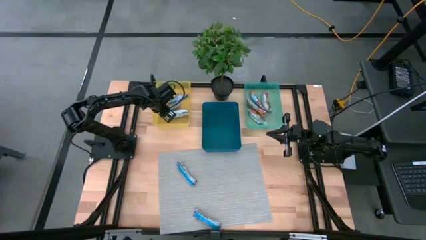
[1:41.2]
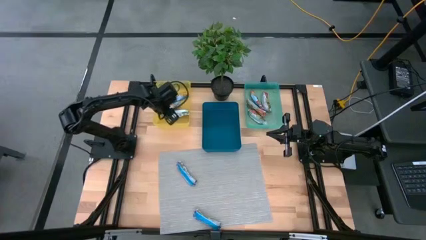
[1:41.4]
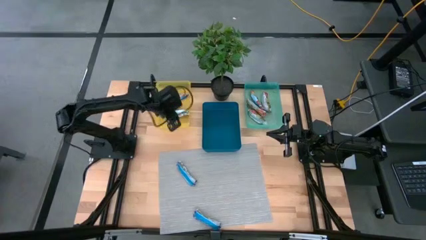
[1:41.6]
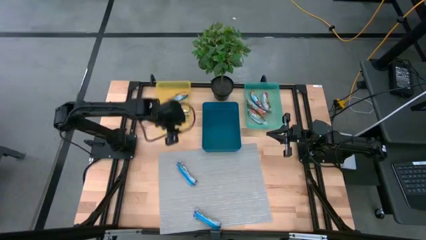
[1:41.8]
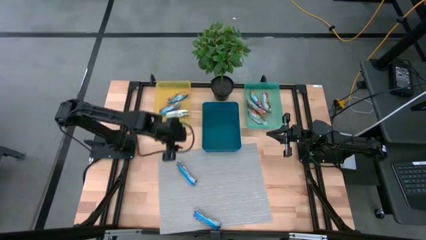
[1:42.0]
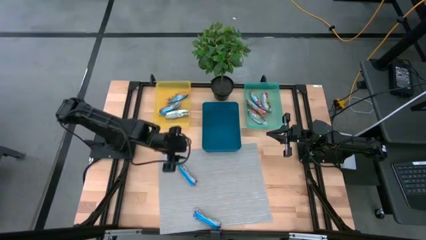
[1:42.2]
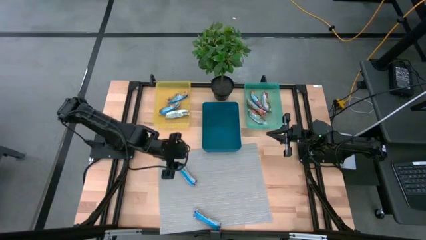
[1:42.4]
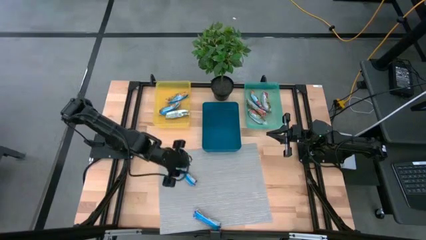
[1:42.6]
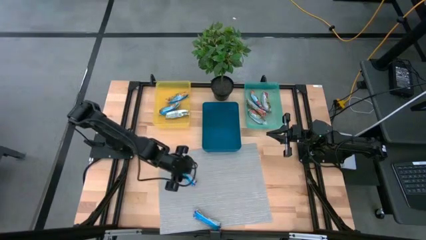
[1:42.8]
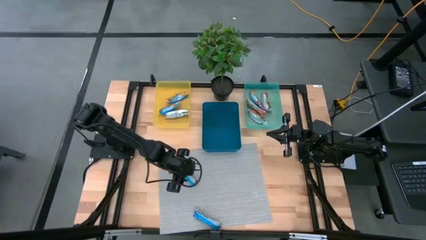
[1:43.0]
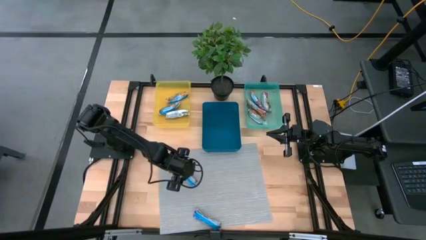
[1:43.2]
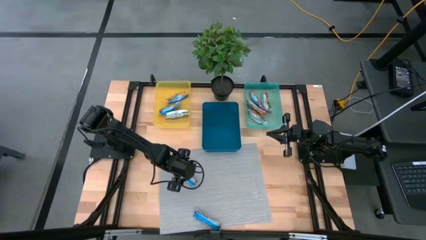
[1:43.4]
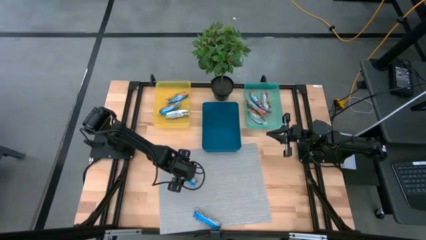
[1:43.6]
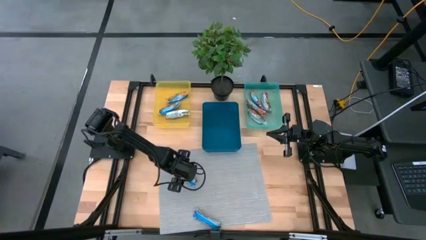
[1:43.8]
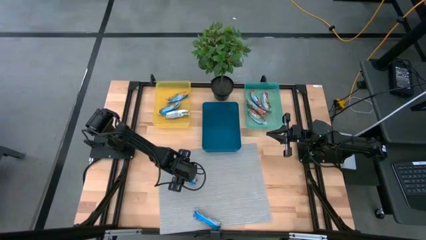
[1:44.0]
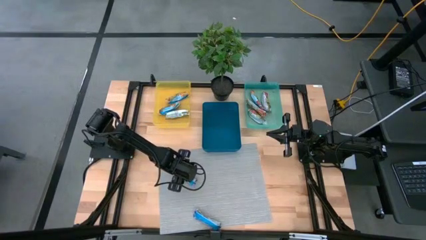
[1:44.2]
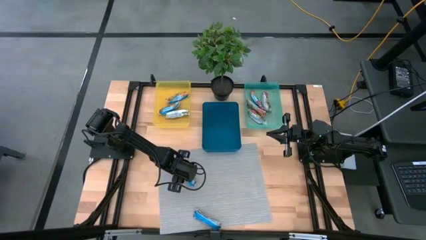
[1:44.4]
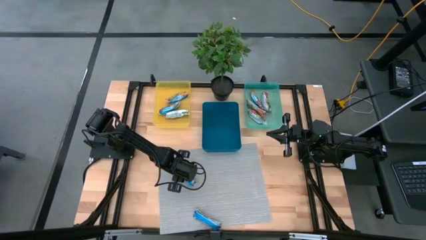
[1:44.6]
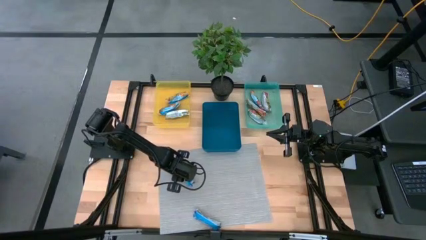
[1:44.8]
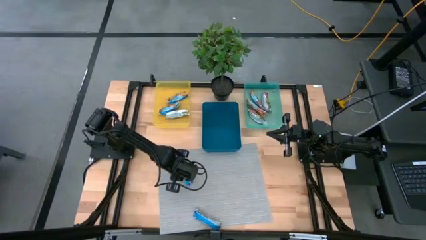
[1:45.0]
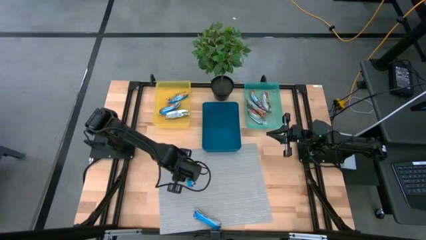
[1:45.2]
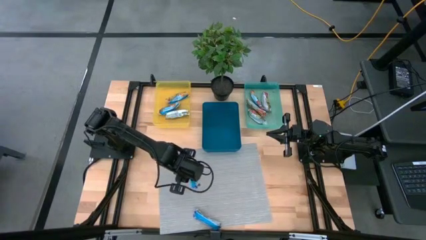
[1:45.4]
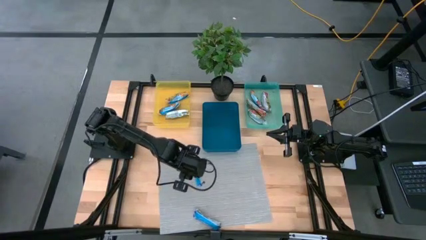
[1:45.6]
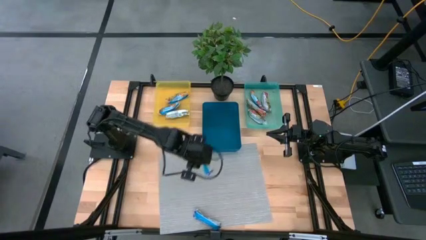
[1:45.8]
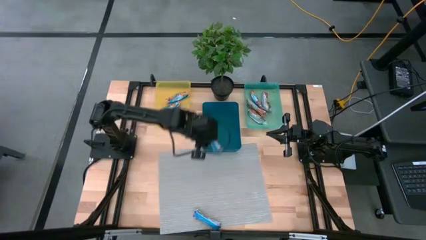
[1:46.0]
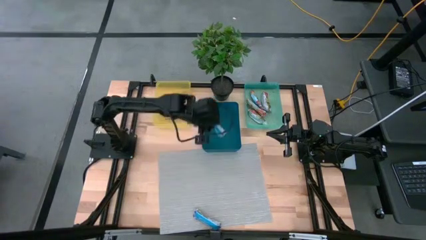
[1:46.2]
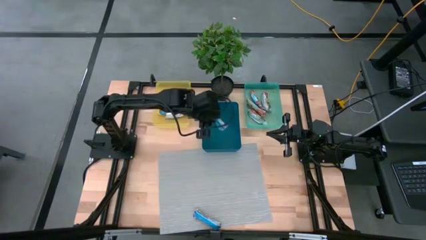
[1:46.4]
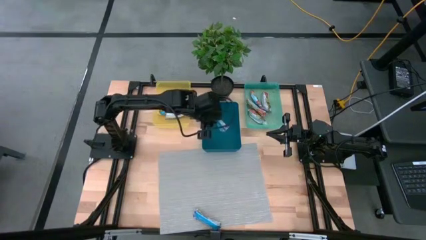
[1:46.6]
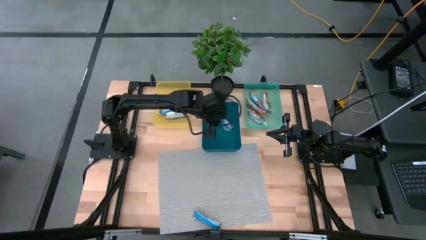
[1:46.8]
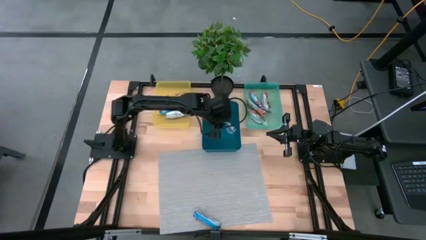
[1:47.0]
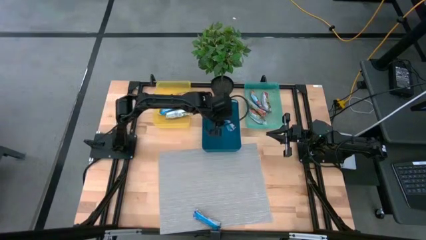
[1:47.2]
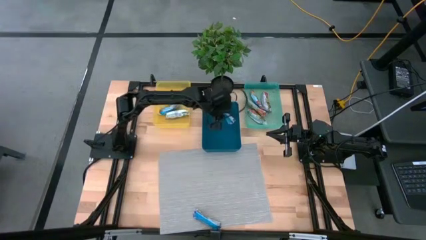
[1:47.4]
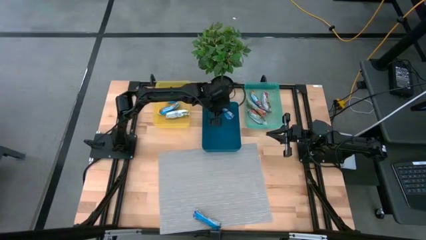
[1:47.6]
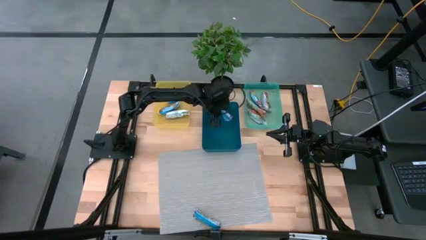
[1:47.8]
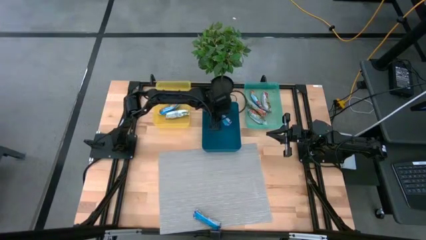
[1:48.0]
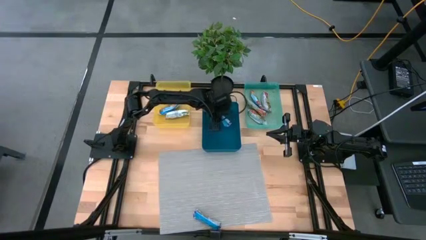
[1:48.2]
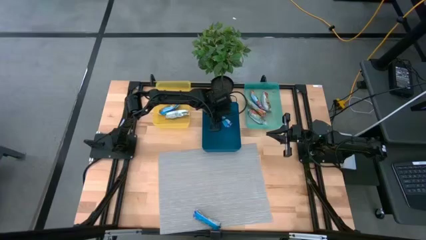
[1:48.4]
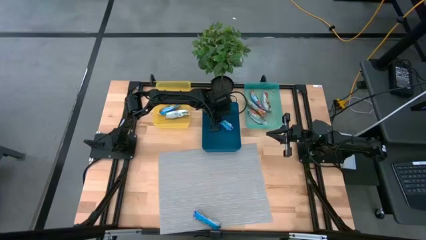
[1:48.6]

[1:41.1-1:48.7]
Task: Pick and place Granola Bars by type
Put the blue granola bar into the blue bin

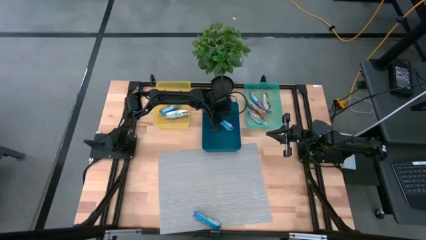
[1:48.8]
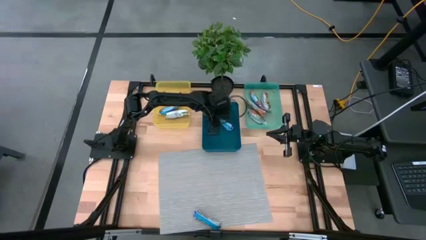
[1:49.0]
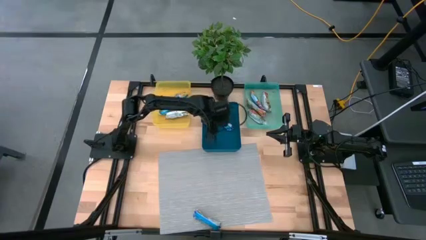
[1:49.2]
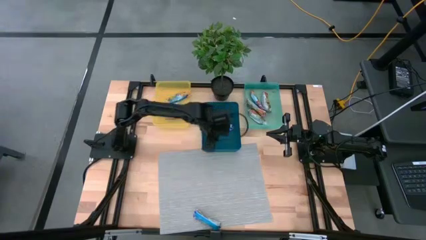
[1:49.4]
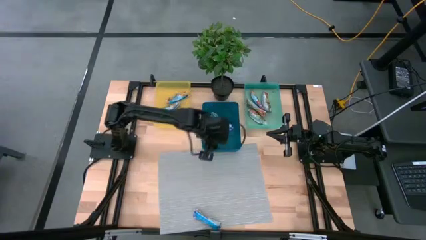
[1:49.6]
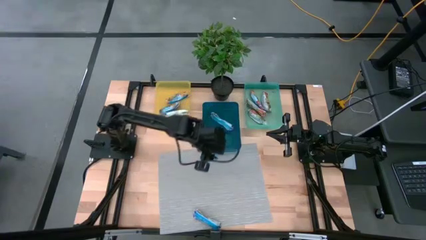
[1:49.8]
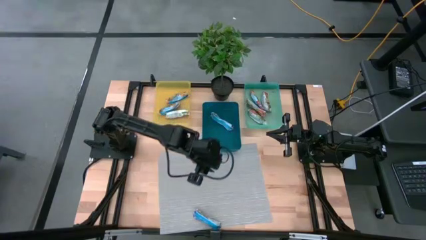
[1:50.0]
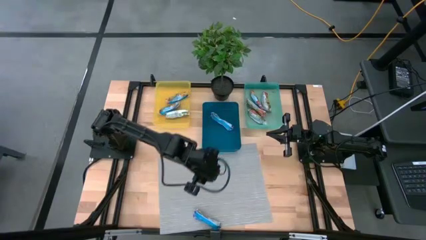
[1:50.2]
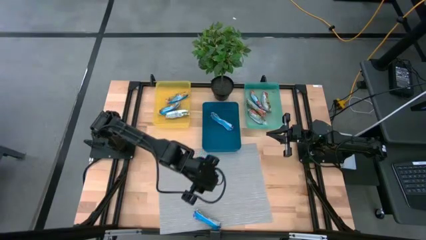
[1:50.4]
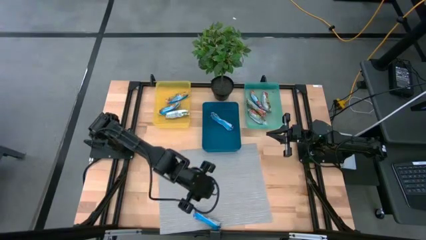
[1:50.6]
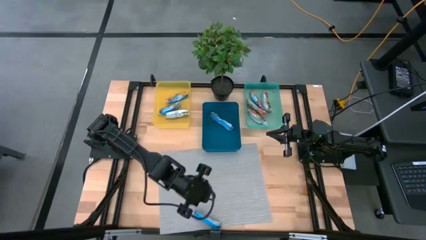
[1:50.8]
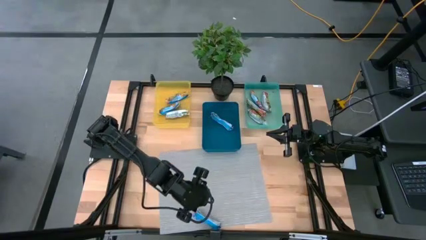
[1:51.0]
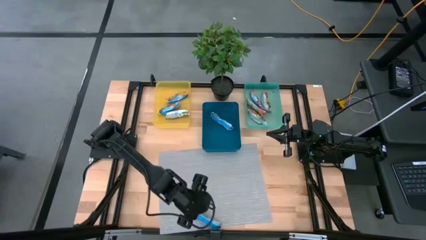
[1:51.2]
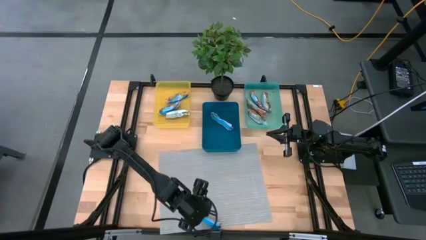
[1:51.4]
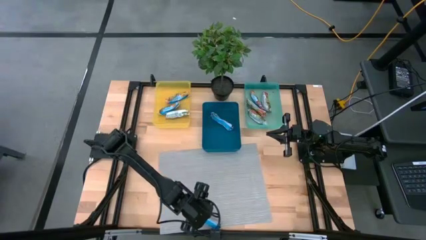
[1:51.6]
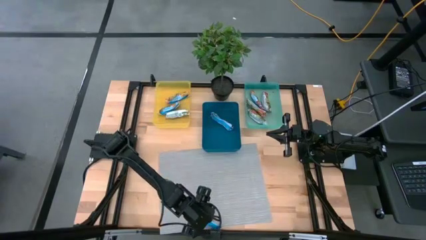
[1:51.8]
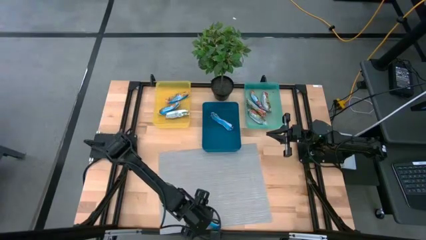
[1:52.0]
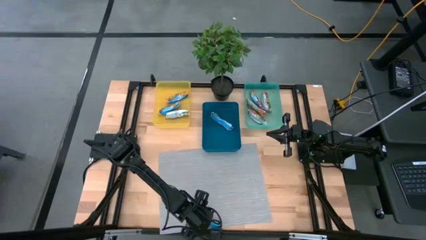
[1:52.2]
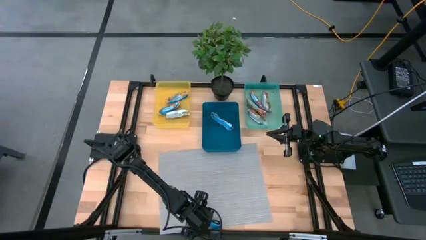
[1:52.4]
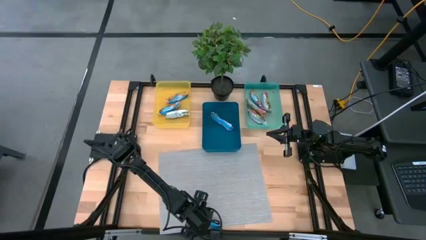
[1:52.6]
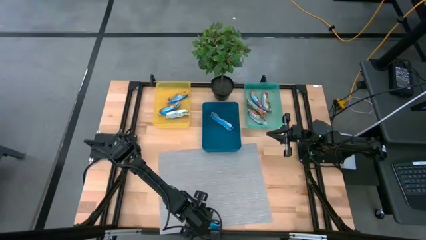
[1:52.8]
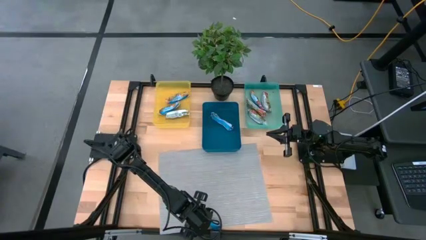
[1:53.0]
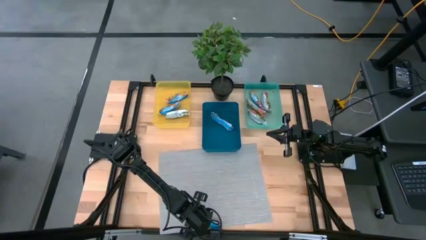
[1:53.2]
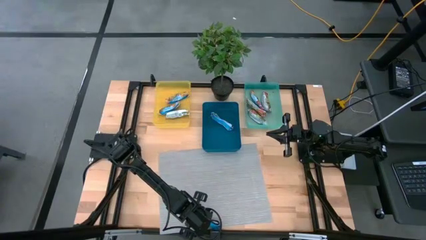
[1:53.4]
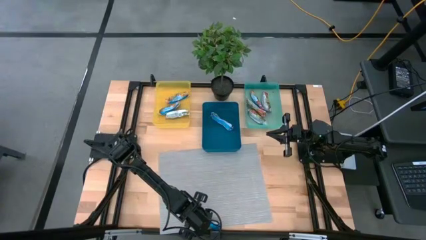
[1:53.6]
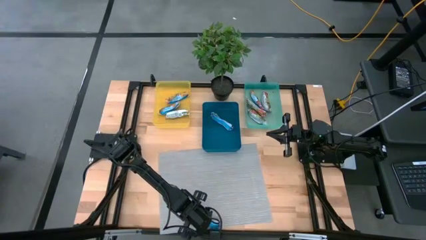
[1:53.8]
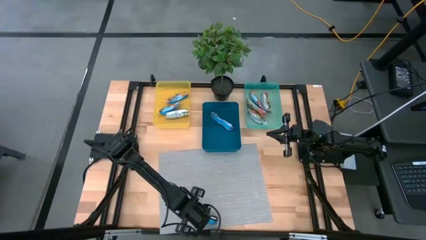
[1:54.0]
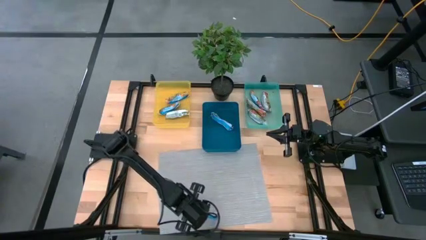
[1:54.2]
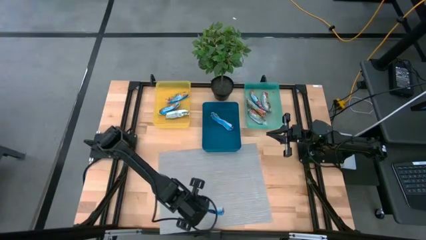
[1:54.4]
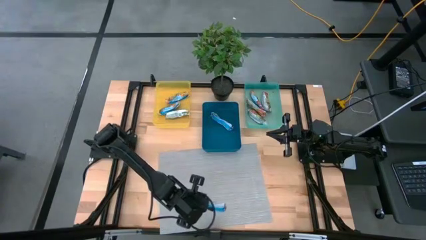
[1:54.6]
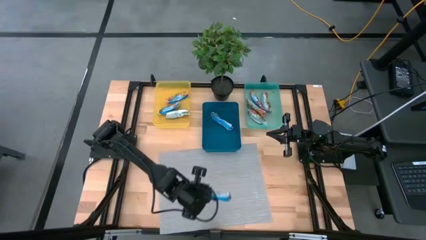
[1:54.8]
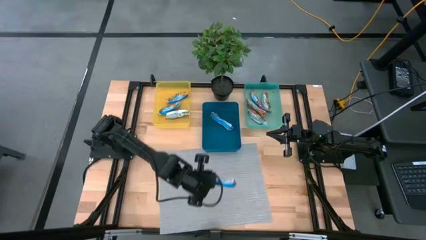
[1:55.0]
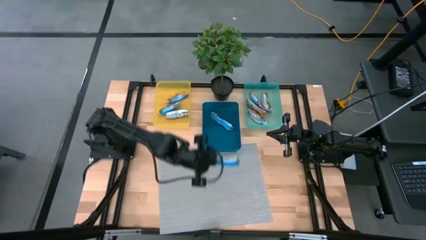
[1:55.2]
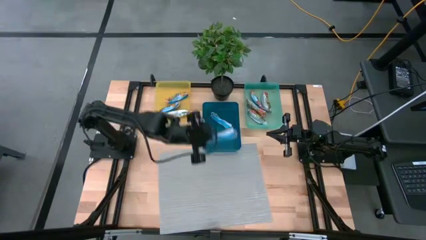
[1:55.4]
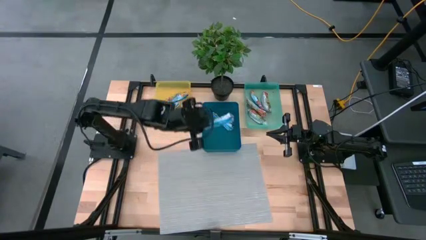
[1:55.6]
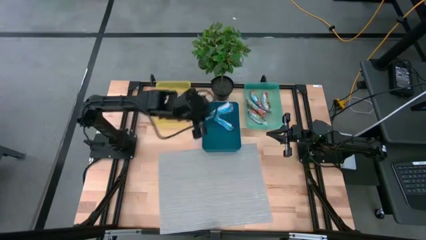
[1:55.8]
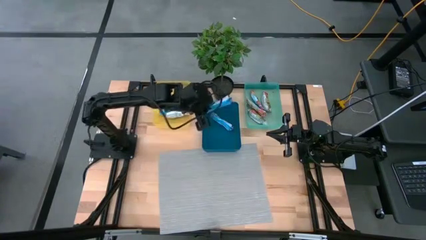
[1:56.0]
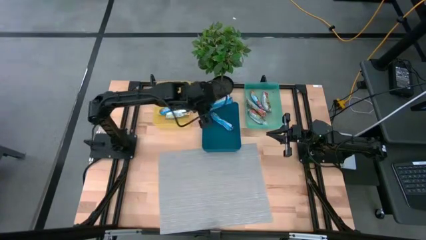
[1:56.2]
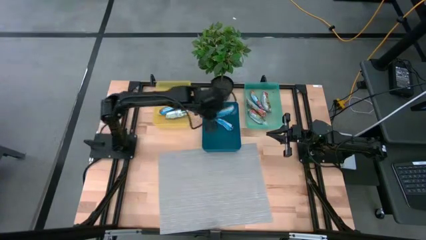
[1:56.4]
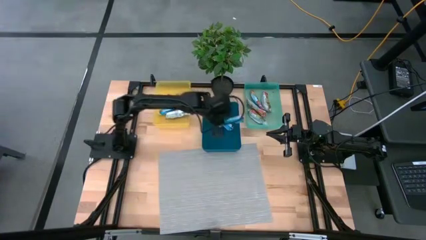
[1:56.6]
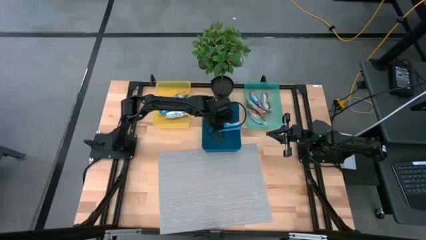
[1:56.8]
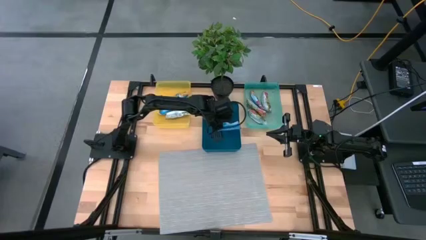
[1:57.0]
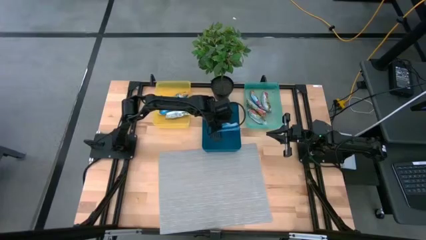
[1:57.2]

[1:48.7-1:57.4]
Put the blue granola bar into the blue bin
